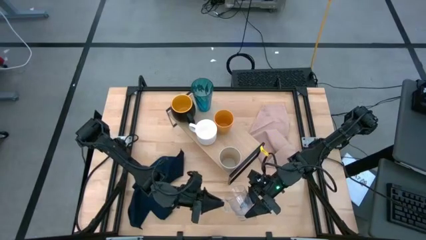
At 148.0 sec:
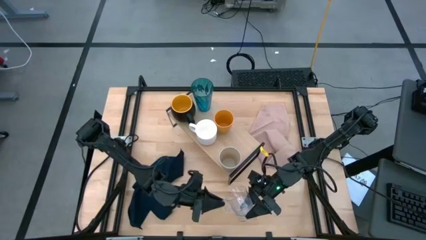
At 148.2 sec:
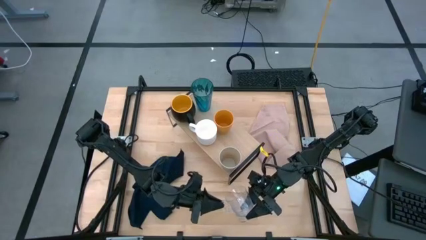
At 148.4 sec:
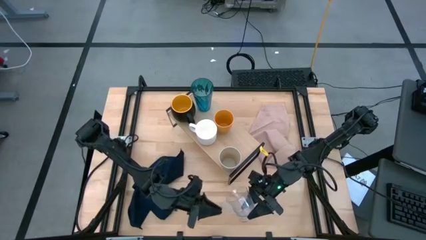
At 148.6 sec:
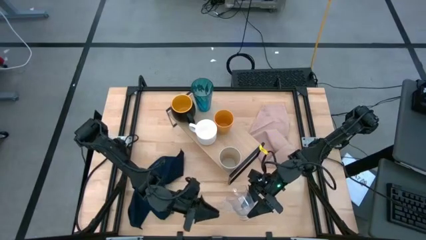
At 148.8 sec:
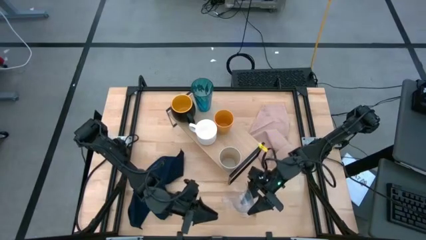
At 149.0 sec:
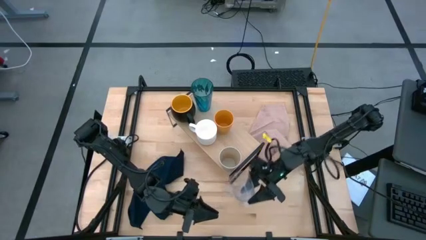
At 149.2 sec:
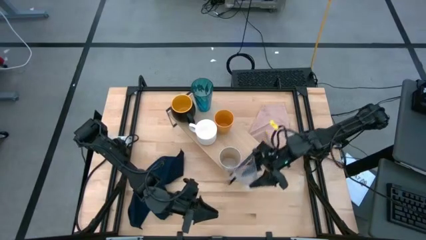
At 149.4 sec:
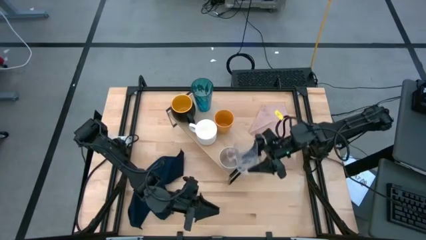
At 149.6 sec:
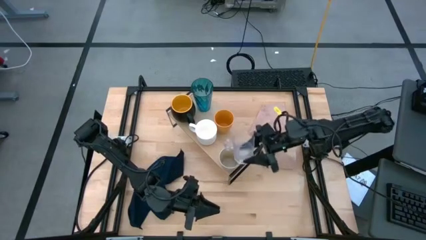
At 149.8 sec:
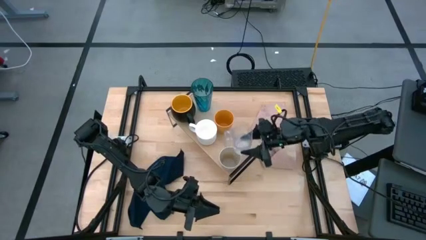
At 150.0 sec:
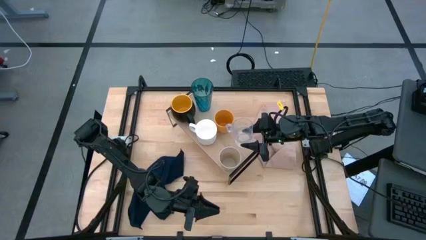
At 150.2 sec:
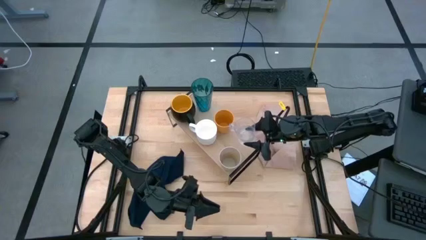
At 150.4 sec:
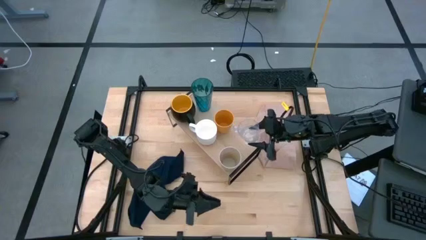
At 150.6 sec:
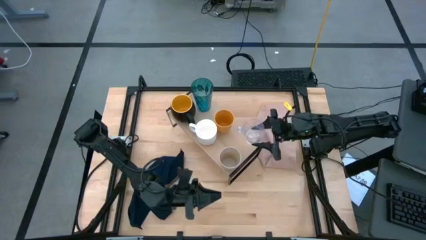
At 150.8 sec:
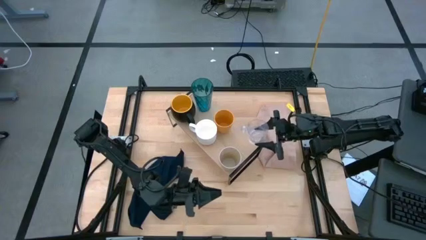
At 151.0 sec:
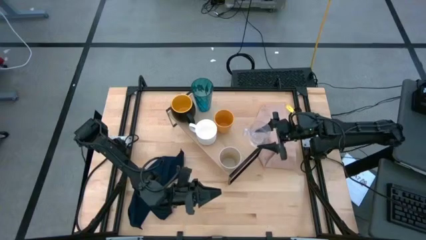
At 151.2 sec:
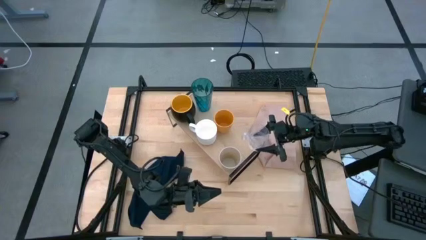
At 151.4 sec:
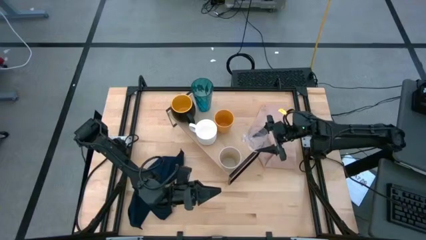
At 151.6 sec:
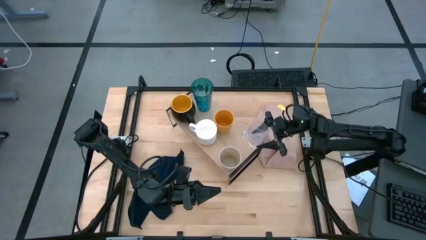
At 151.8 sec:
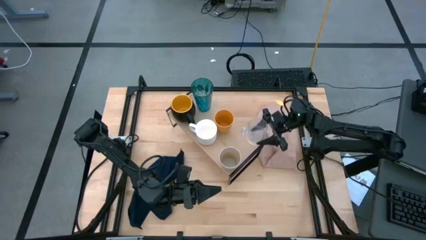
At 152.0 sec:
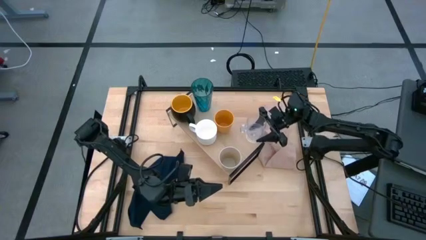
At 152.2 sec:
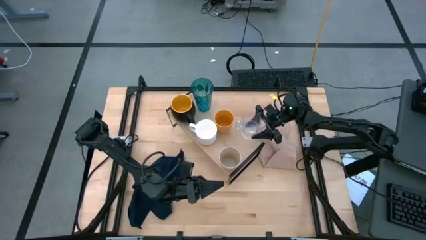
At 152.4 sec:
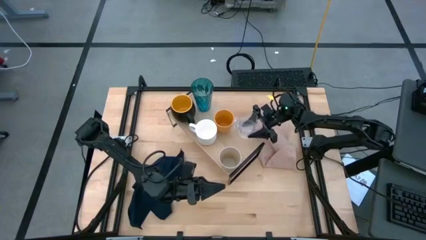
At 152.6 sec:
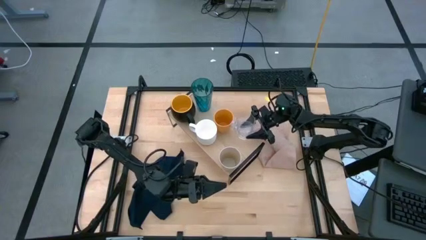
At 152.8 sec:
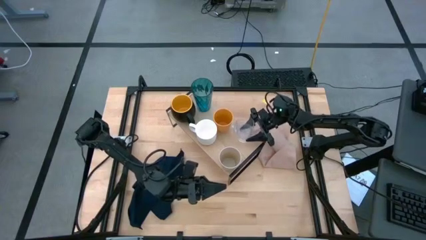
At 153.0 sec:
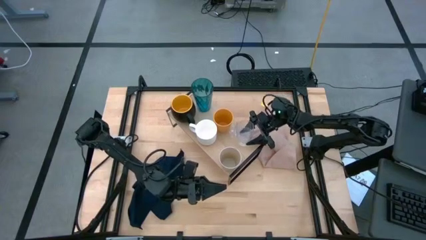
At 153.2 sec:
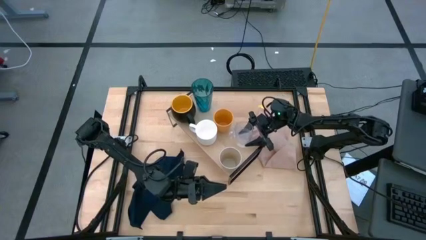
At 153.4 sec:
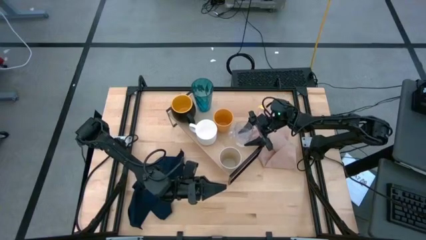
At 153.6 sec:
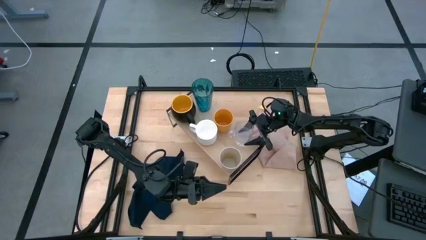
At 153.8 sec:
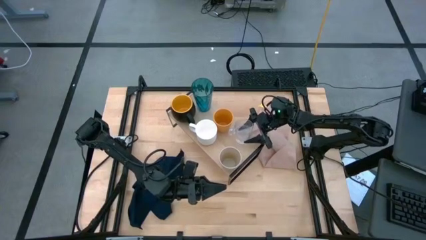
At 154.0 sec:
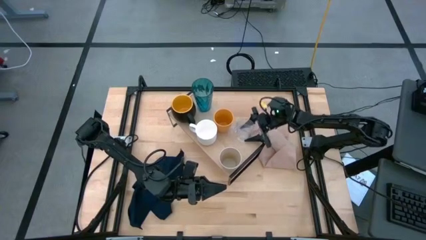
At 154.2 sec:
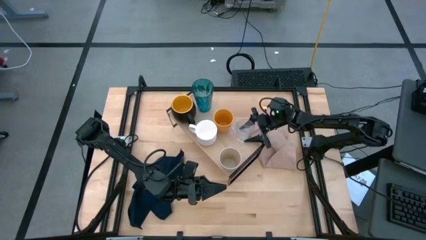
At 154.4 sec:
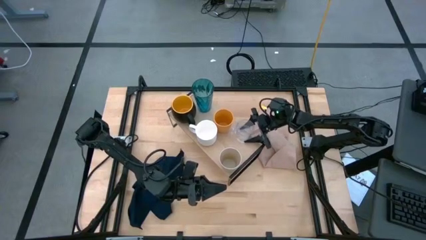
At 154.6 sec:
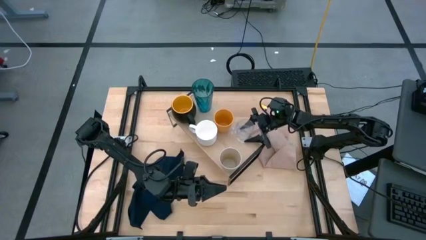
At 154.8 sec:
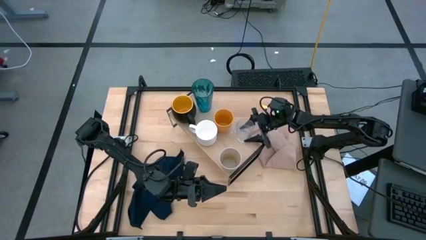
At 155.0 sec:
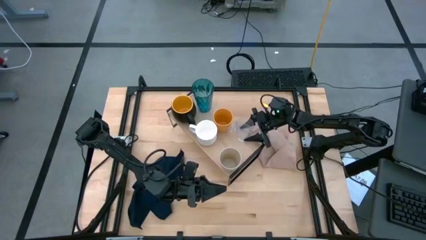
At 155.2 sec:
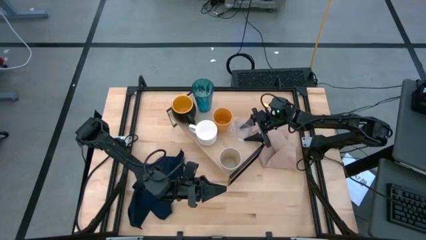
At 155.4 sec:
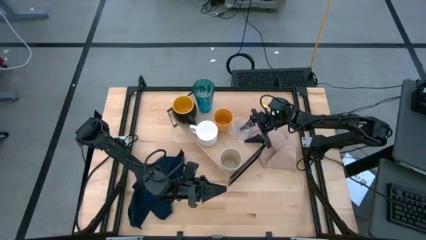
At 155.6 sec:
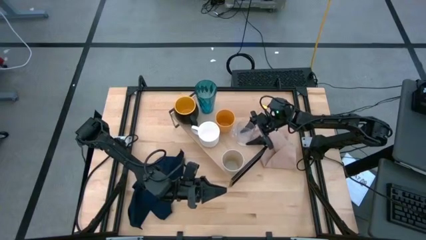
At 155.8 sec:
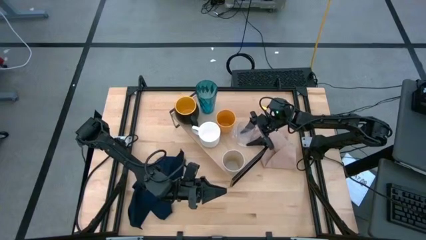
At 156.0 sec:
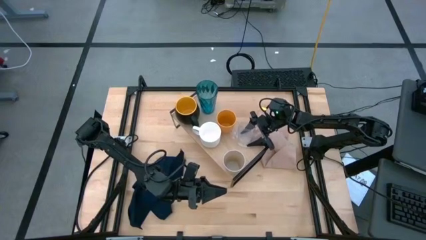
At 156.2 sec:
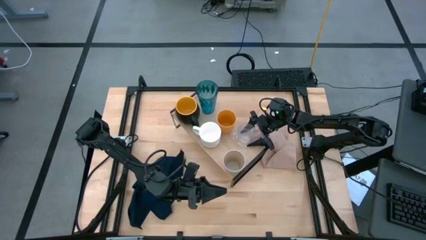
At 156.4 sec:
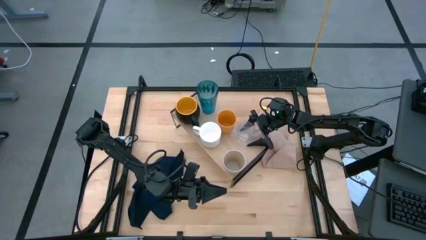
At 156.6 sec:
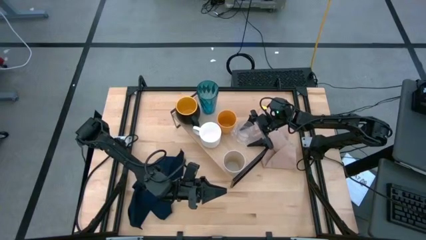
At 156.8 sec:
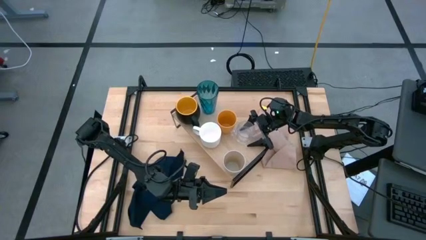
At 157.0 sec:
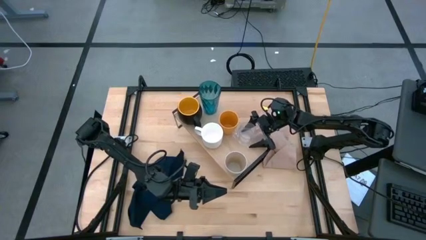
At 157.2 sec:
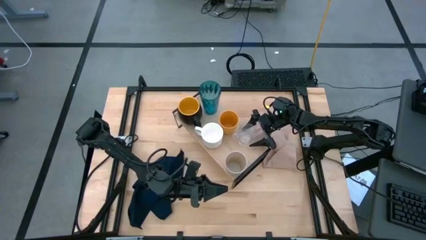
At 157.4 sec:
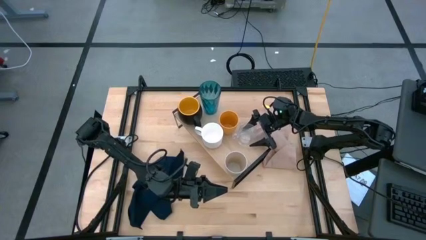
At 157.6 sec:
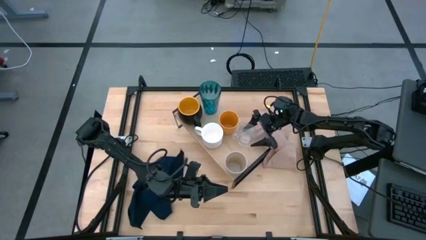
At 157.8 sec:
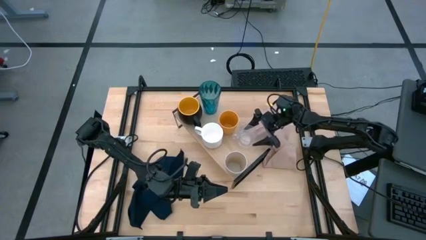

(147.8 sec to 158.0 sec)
Task: Stack small to large cups/mugs on shelf
Put the transparent mug on the shelf
